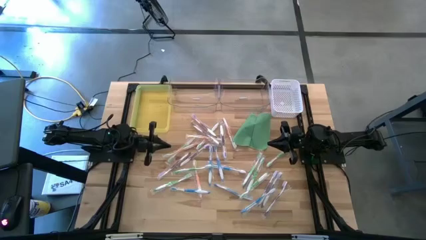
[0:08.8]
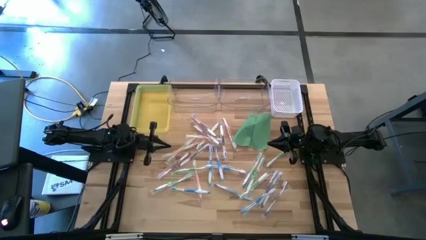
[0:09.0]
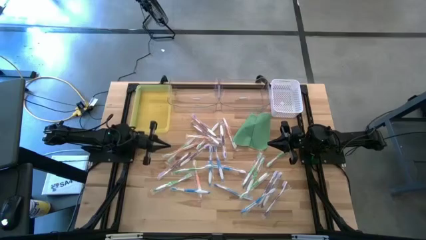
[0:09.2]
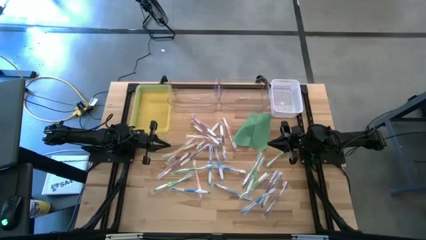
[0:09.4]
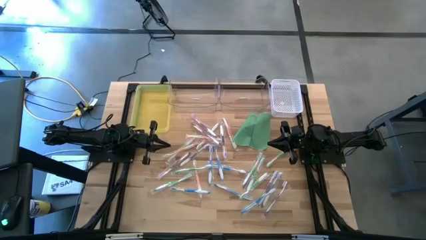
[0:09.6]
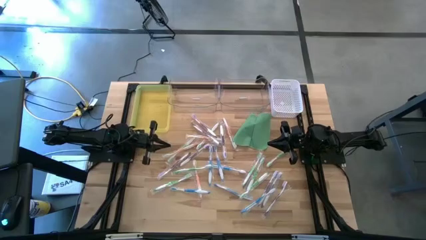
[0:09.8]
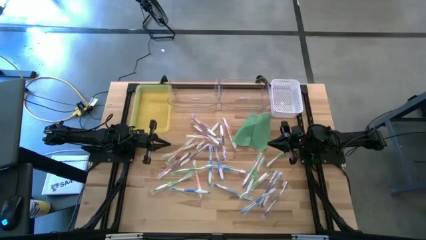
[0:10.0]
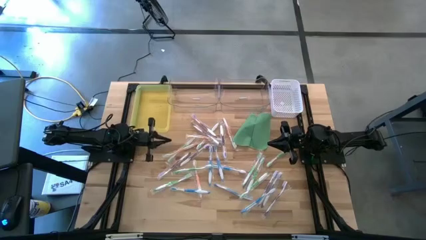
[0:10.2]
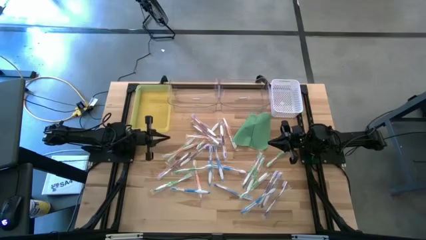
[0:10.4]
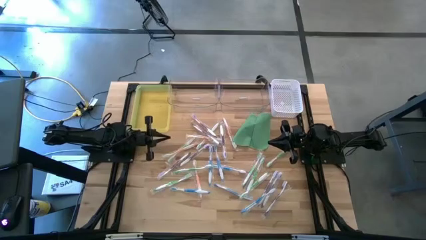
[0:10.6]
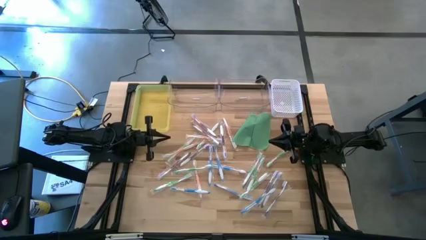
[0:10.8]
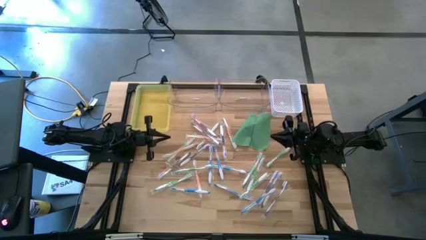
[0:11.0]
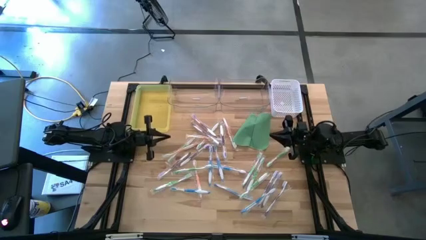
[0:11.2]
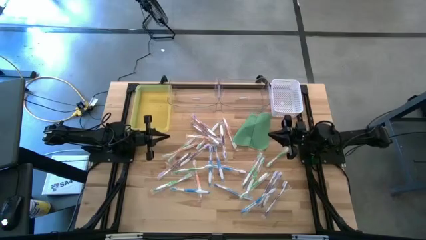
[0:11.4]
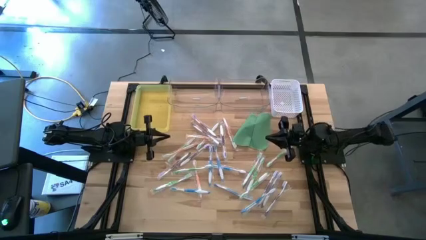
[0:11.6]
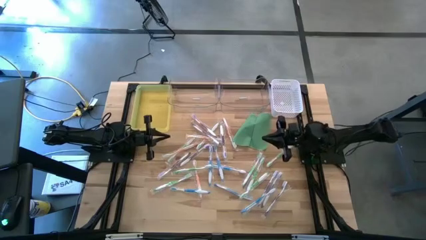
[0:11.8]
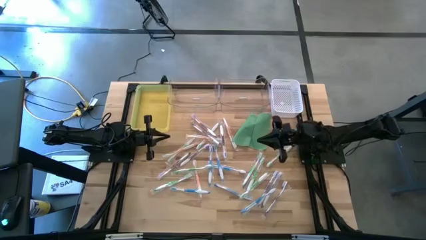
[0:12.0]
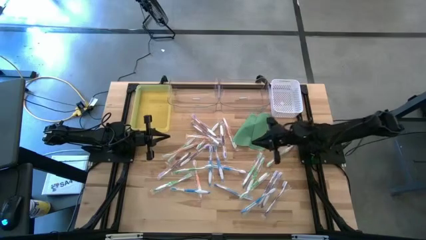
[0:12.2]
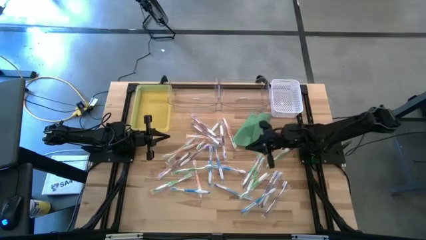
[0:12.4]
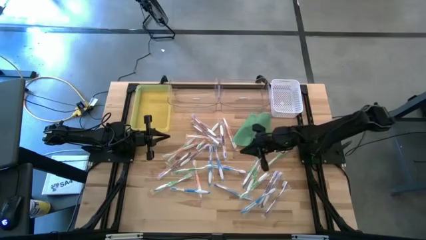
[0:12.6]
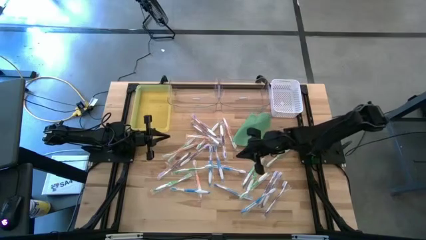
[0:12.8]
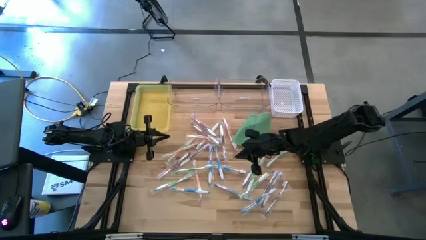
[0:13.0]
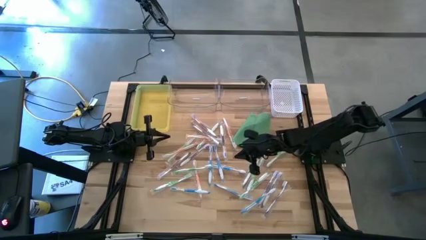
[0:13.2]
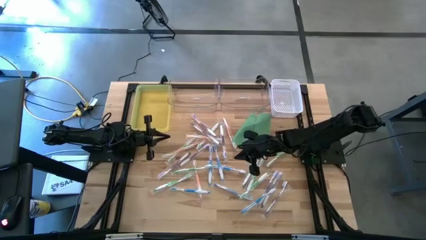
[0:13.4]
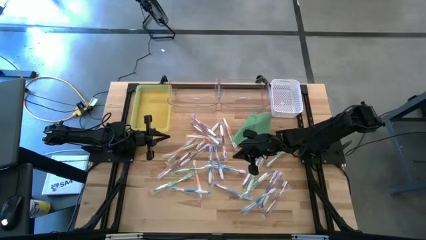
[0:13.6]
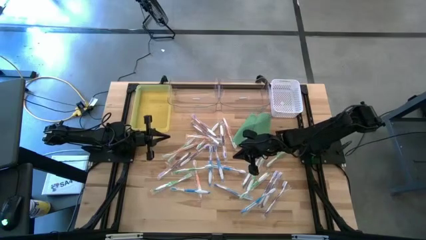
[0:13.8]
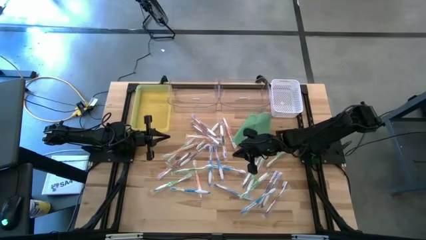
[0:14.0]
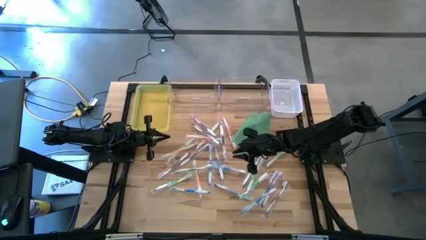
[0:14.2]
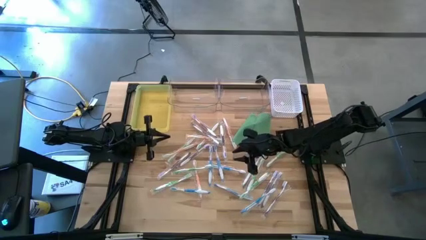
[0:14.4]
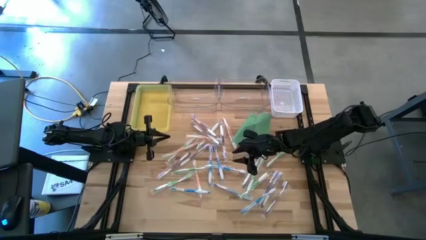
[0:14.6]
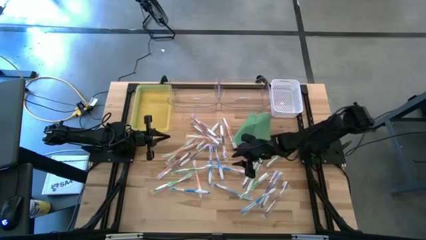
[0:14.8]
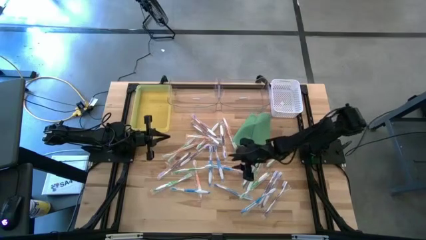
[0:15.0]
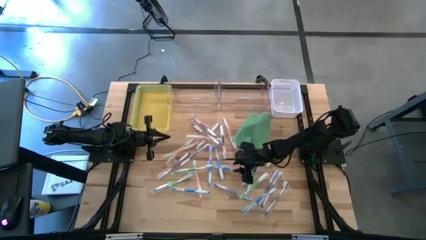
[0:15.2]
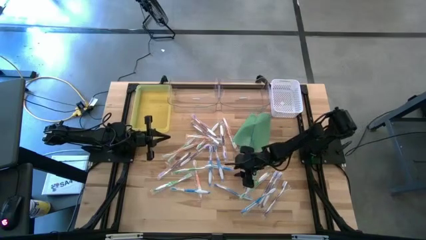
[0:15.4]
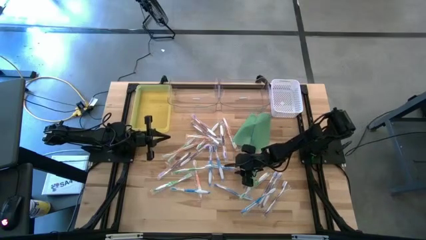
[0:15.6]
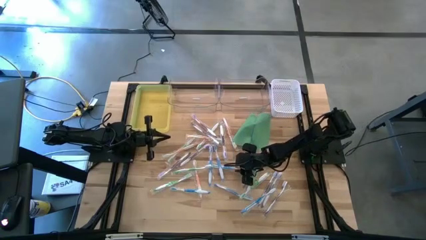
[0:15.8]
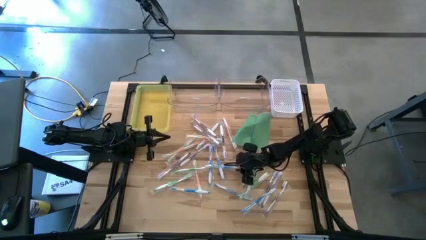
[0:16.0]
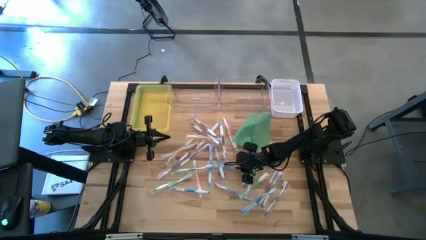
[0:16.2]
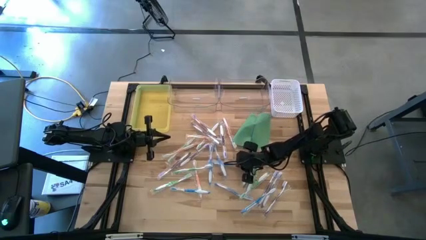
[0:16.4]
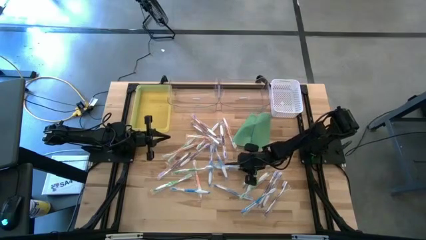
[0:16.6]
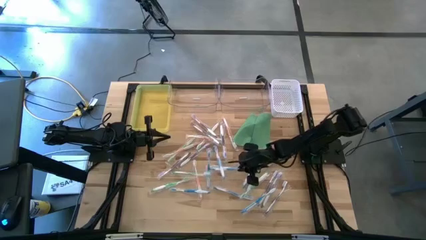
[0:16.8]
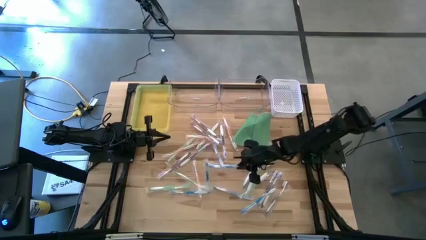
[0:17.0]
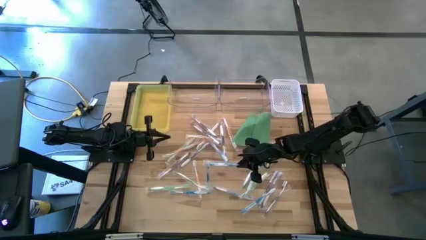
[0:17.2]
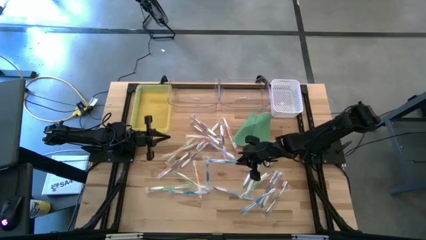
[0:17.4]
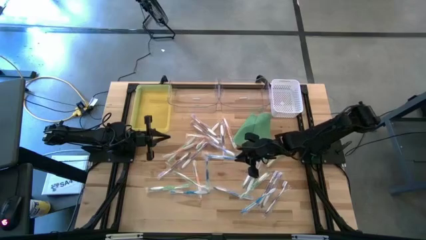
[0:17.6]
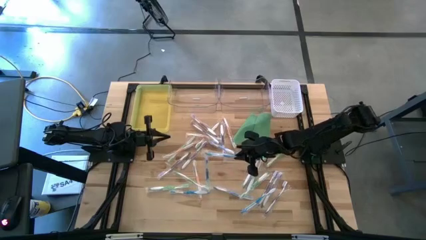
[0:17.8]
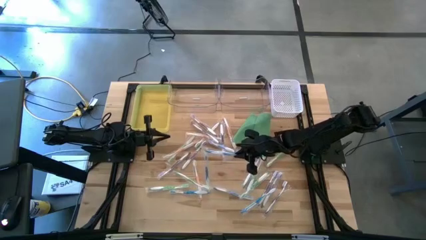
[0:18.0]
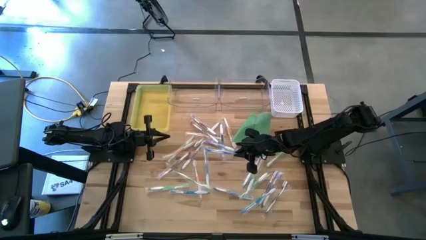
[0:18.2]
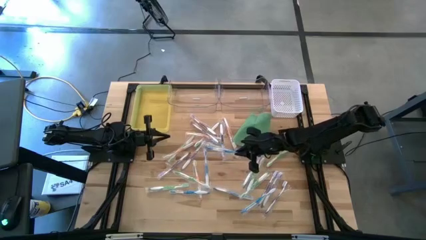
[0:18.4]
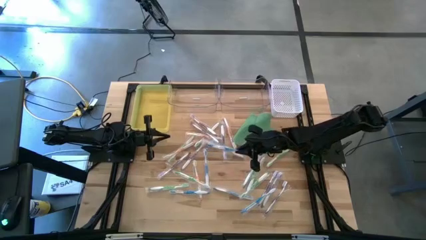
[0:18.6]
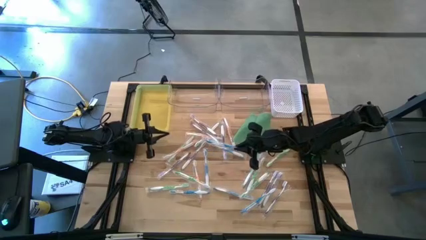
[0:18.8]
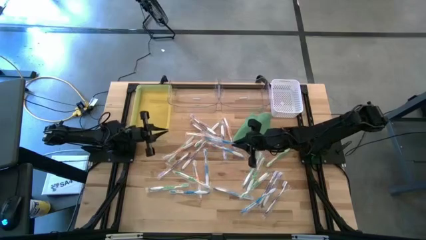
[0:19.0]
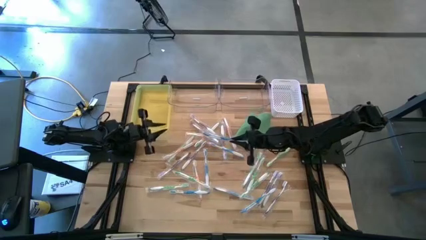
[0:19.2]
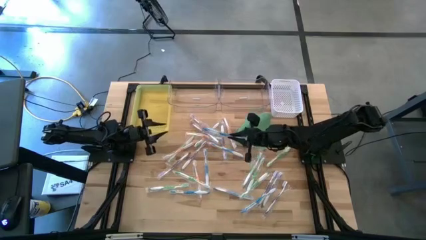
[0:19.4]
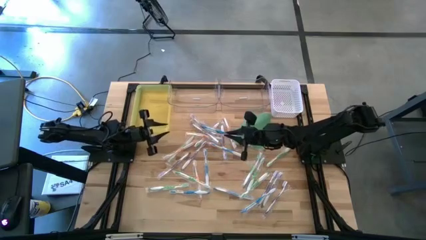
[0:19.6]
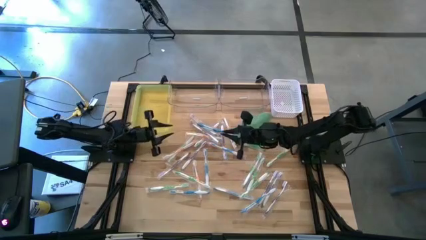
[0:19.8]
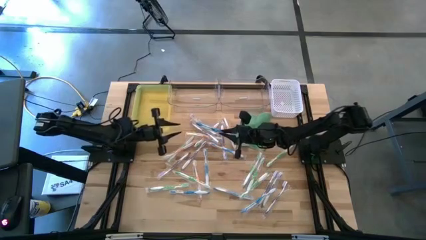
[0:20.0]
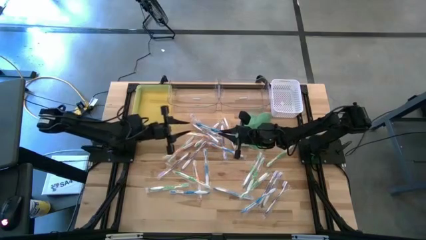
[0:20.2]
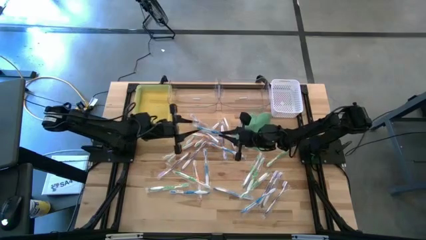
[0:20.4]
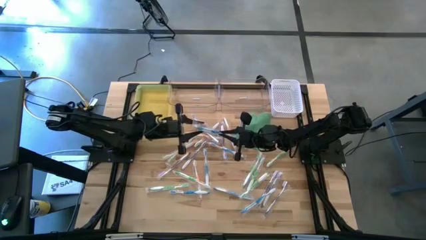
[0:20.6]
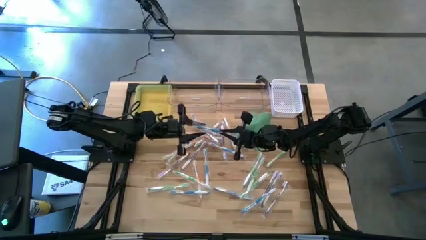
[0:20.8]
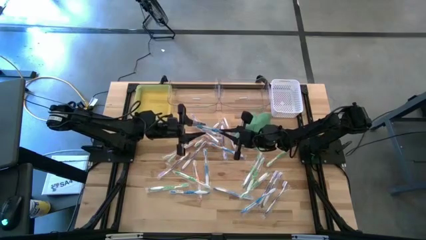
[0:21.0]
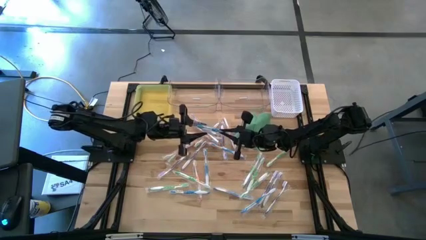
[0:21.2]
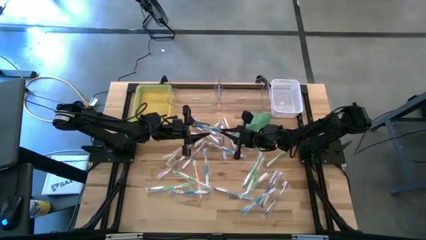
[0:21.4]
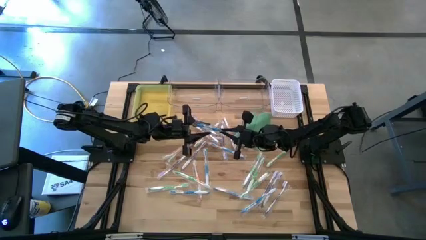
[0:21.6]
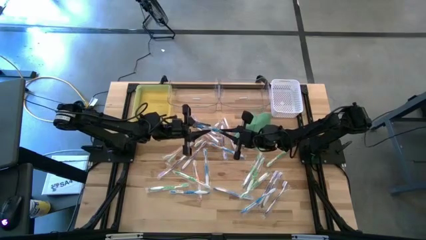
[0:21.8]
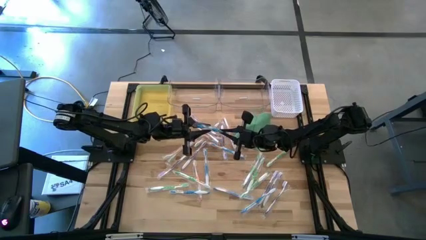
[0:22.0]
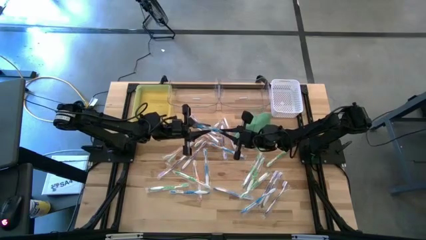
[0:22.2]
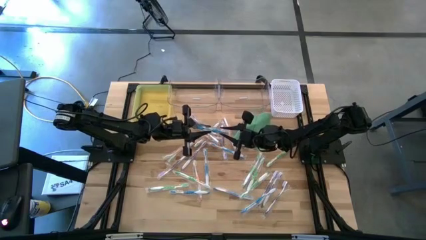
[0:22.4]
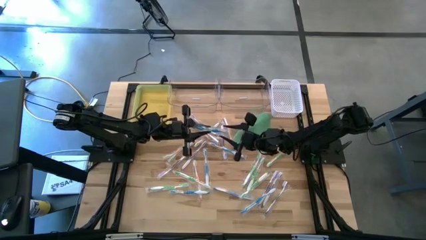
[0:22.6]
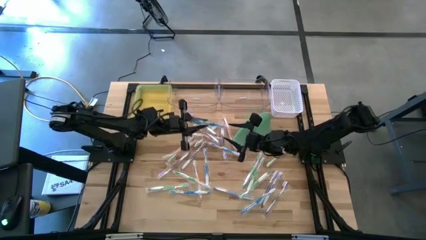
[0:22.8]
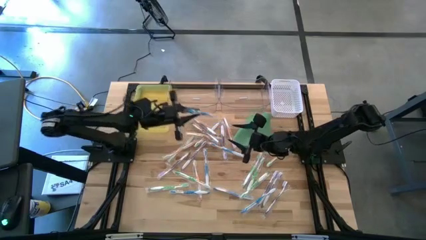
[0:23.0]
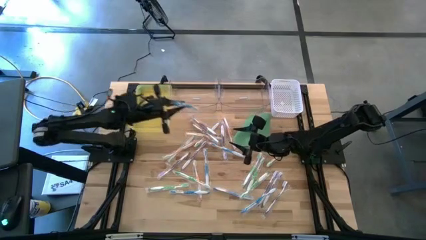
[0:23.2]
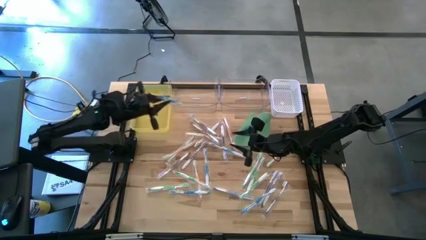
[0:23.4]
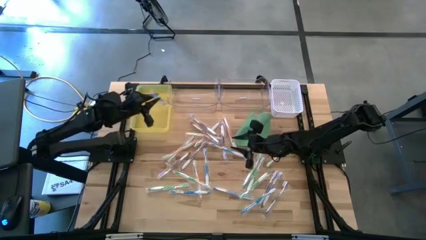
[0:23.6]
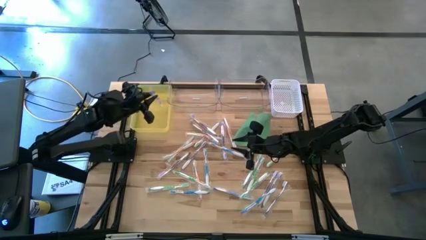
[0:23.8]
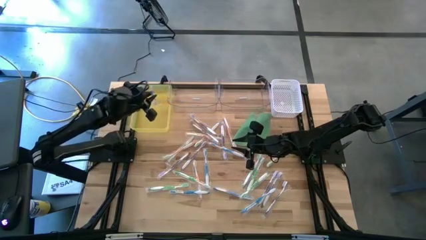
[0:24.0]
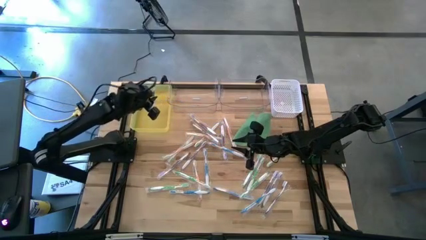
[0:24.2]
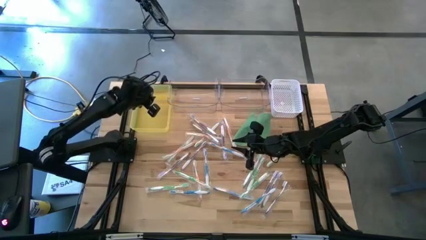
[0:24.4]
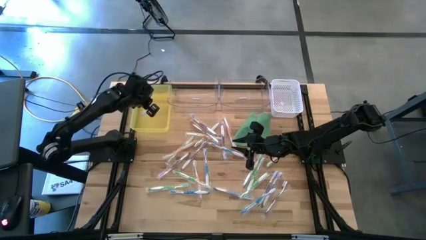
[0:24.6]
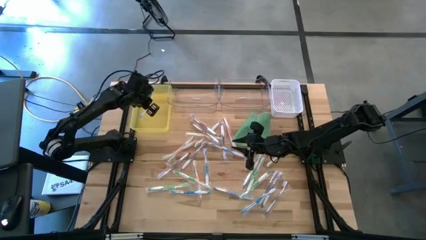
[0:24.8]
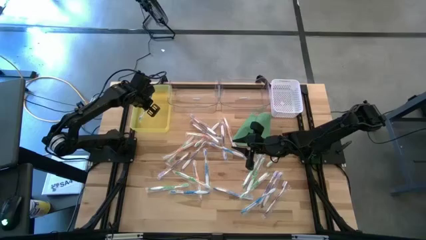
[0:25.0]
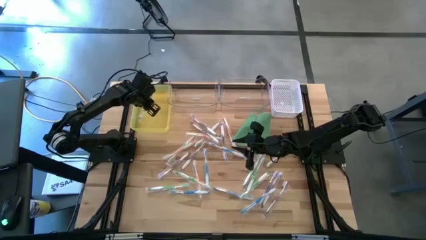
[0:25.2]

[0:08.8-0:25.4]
Task: Pick & Place Toothbrushes
Put the blue toothbrush into the yellow bin
